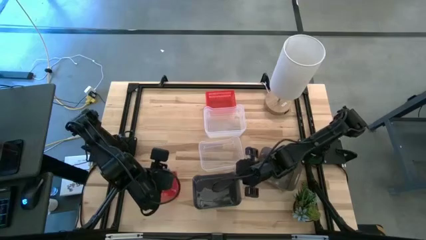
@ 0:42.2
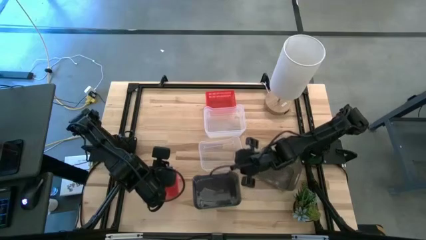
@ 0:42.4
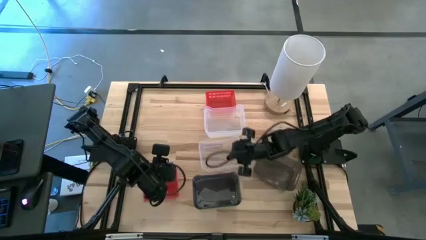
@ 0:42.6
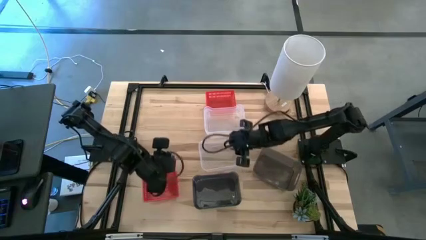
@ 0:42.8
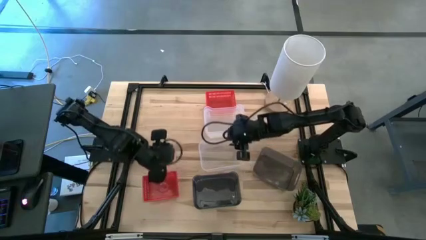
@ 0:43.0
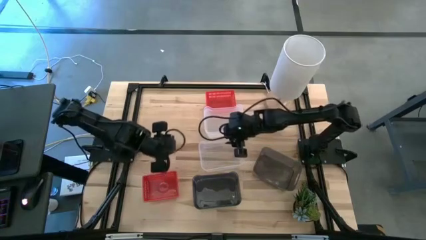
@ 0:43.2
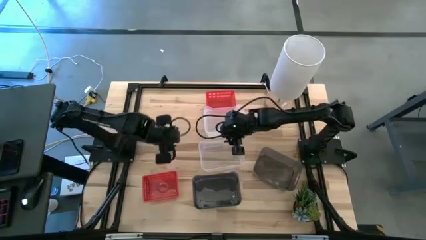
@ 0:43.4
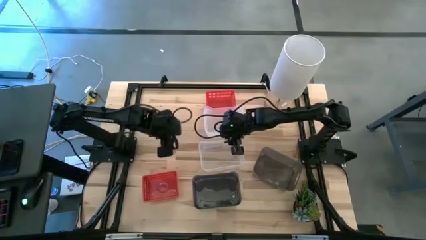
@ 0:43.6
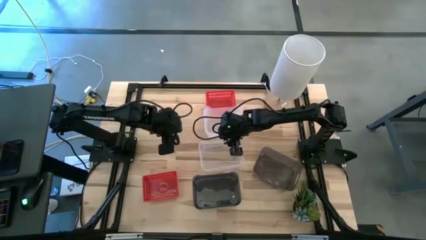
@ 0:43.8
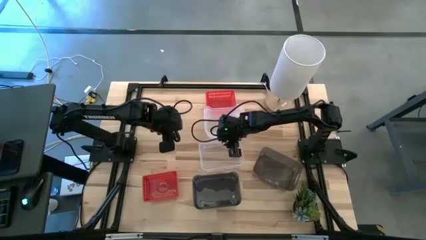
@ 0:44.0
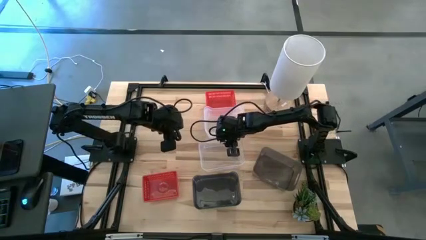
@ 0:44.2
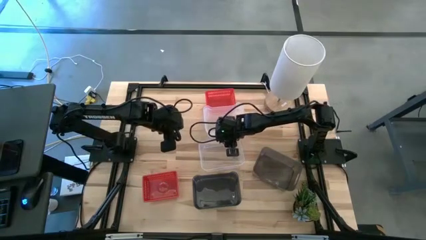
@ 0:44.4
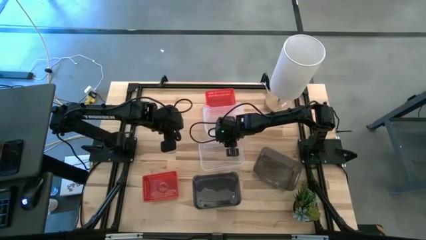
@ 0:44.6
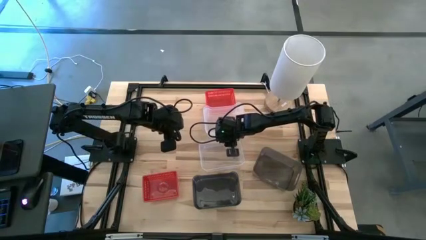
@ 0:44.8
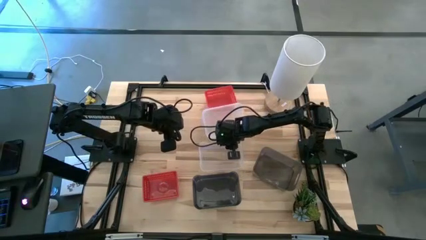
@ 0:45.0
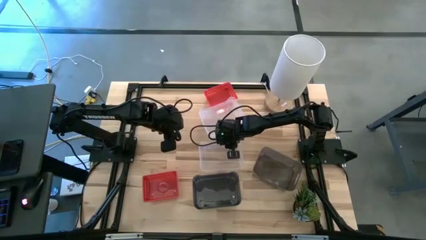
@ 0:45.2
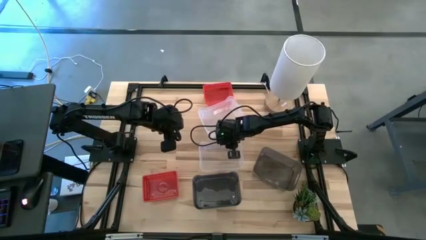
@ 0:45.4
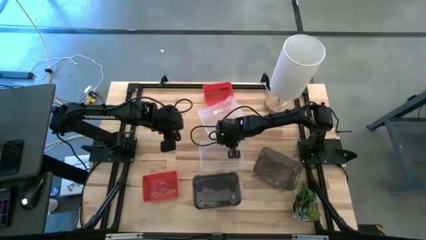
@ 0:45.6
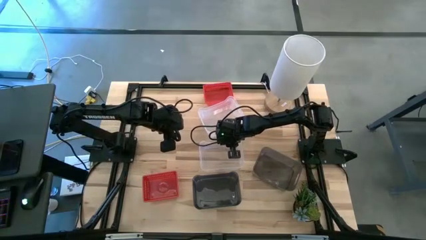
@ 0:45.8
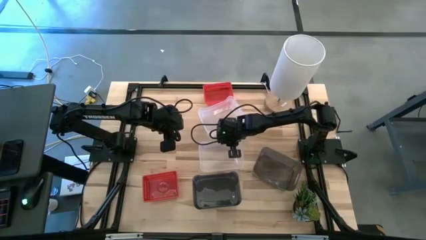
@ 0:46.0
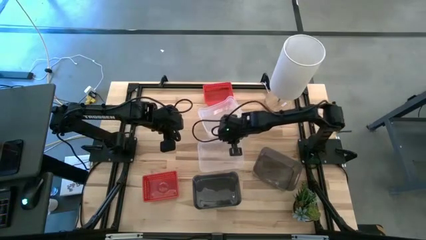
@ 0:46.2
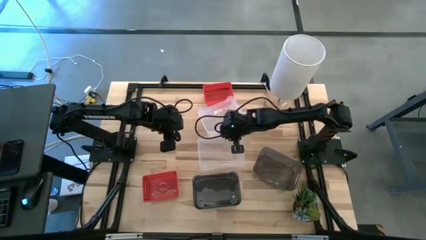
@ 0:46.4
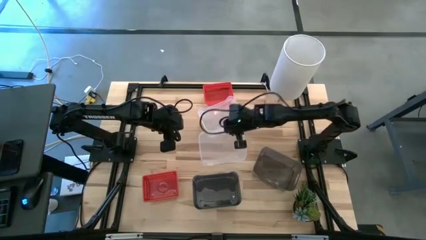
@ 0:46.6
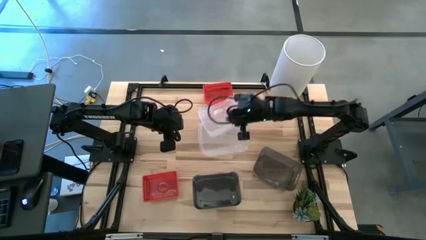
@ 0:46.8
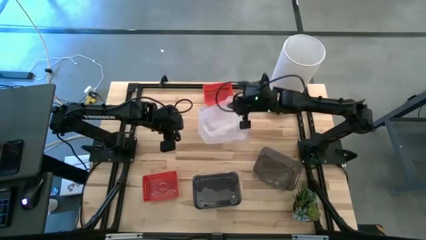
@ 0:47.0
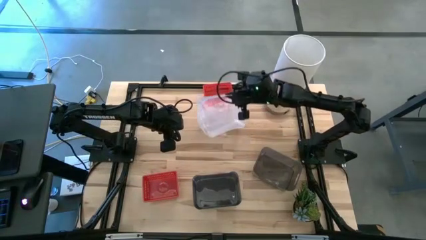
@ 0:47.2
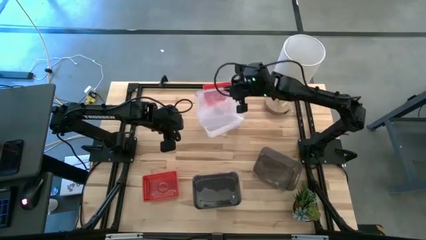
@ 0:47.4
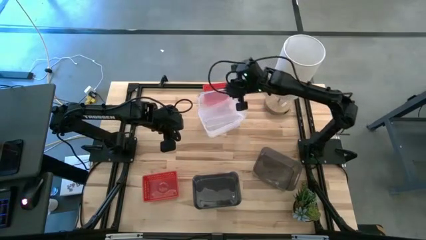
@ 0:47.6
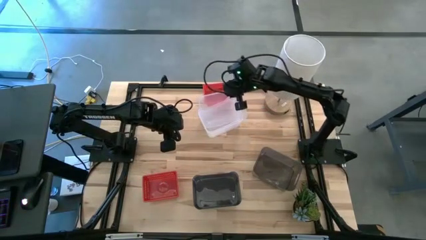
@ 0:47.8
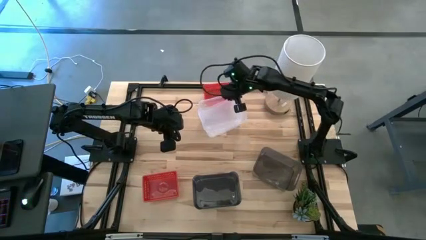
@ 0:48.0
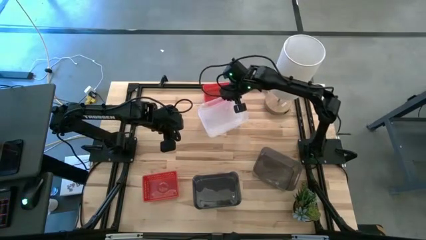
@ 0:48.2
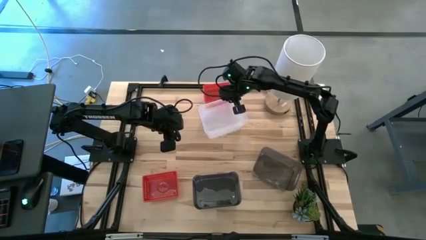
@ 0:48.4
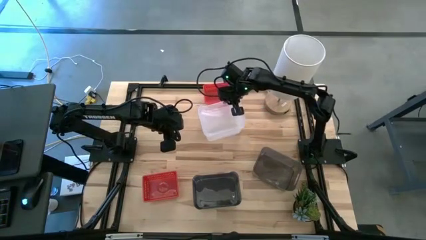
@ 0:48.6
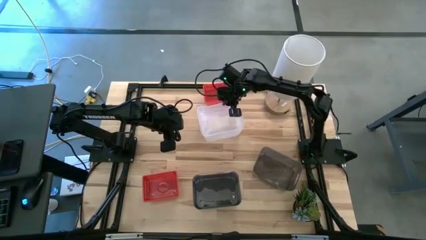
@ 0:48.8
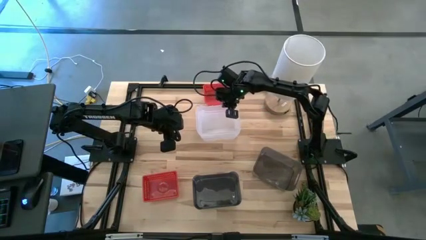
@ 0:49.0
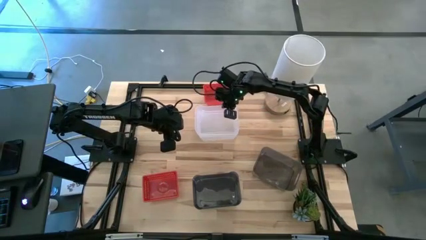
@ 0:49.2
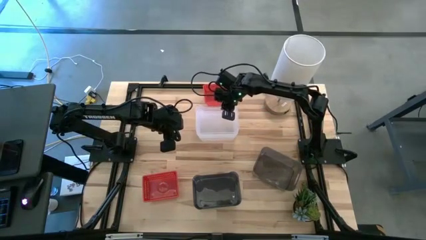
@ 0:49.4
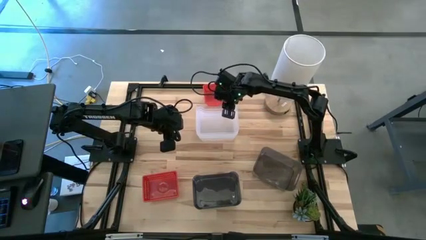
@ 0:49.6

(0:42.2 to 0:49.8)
Stack the bottom transparent bin on top the transparent bin

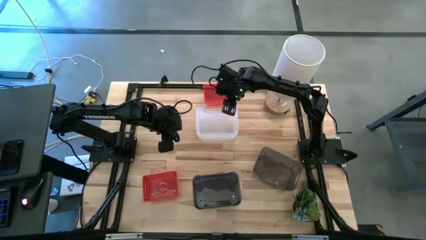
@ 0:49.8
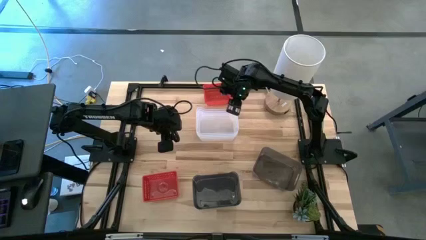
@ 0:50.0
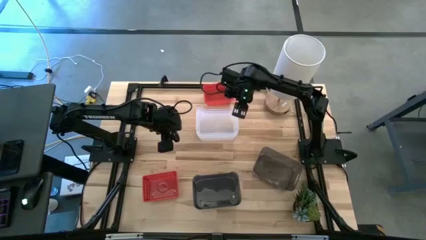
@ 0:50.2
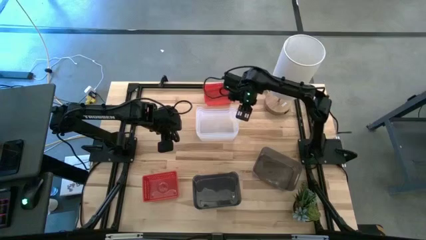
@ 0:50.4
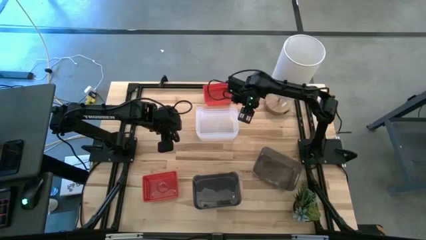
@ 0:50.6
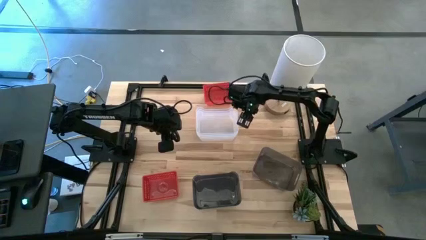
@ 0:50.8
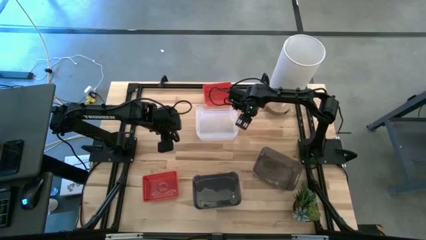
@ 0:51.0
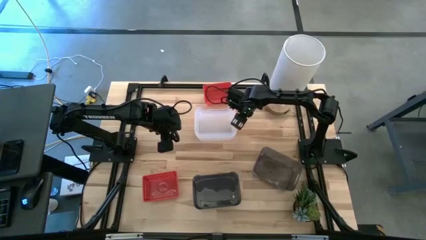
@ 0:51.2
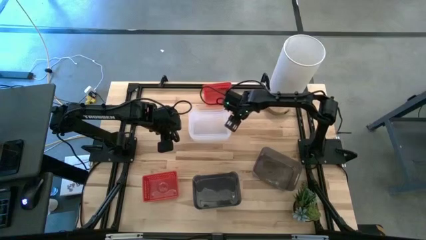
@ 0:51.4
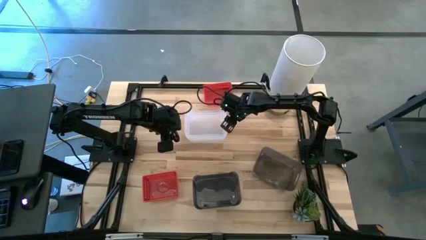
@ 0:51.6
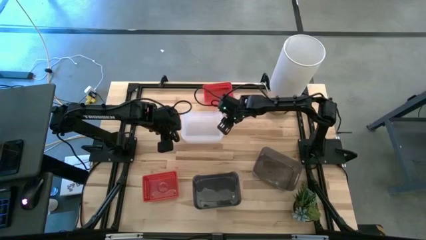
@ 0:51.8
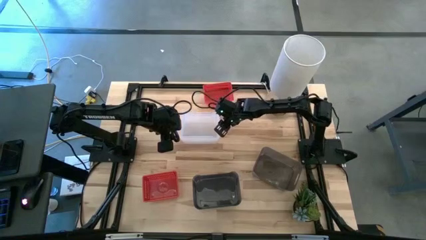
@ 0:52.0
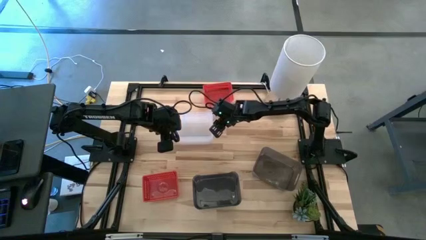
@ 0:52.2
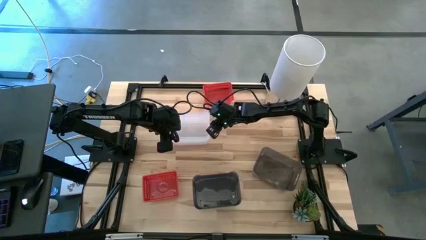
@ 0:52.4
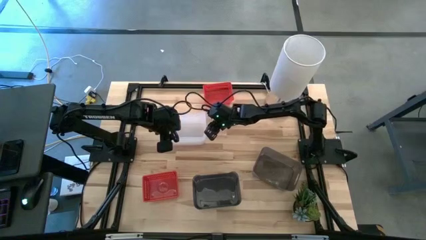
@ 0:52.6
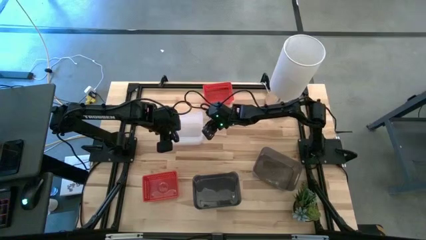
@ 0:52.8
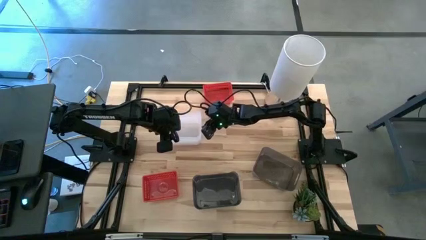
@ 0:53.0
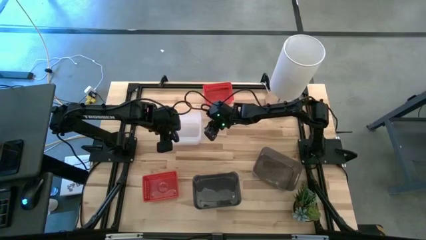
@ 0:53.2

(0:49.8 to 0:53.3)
Move the transparent bins to the top left of the table
